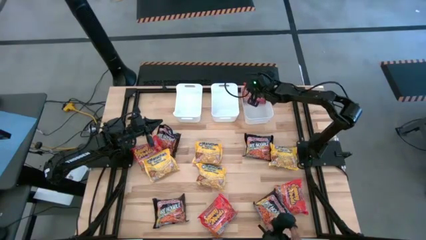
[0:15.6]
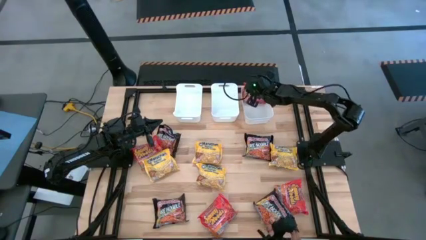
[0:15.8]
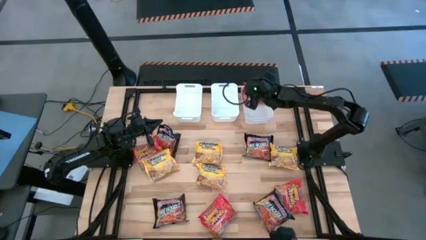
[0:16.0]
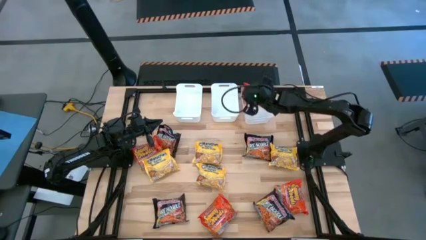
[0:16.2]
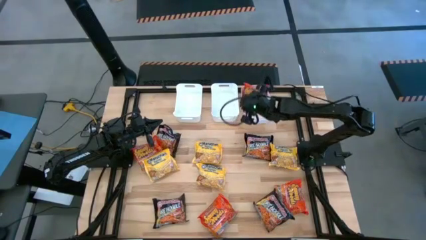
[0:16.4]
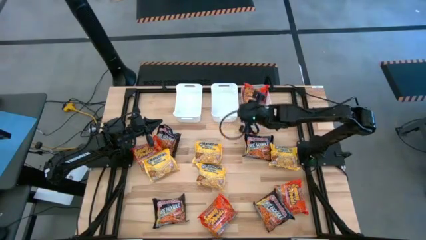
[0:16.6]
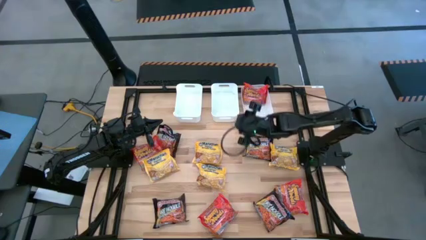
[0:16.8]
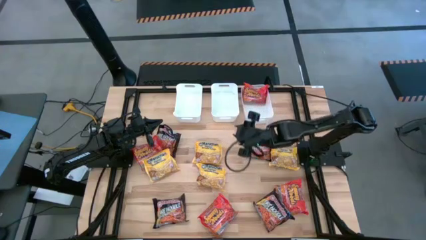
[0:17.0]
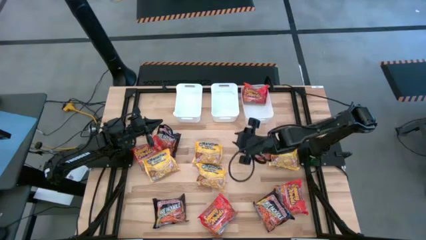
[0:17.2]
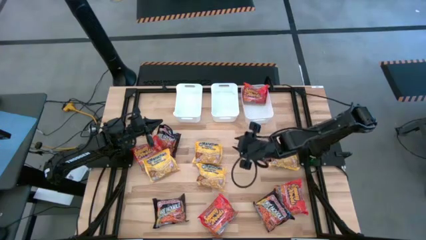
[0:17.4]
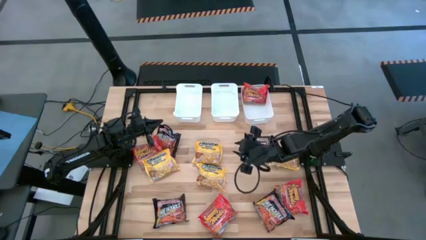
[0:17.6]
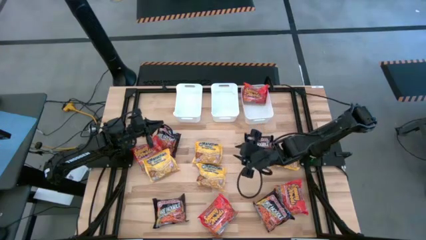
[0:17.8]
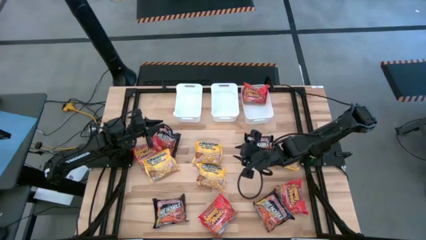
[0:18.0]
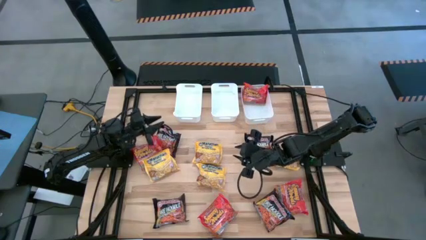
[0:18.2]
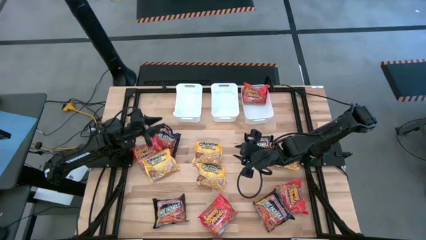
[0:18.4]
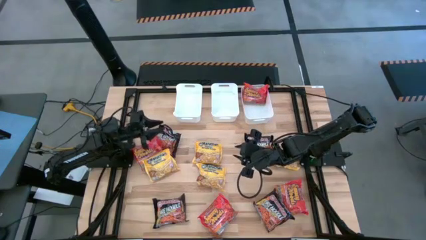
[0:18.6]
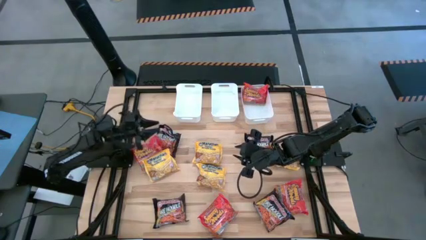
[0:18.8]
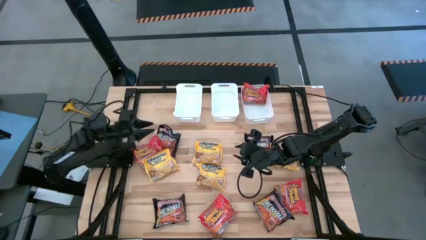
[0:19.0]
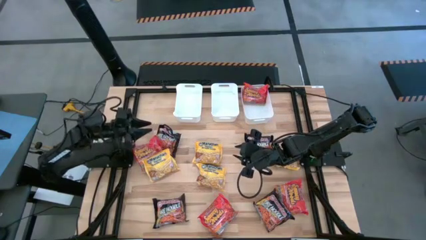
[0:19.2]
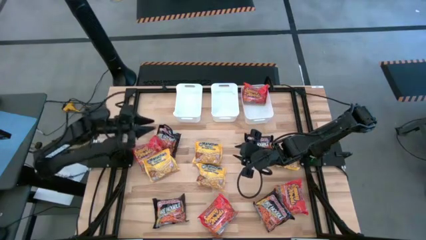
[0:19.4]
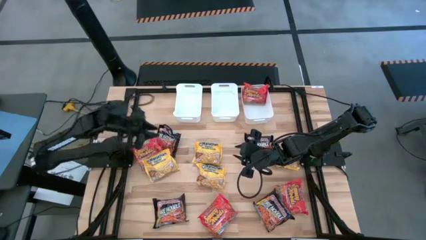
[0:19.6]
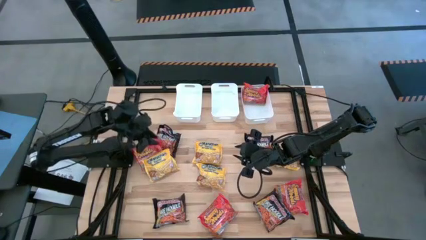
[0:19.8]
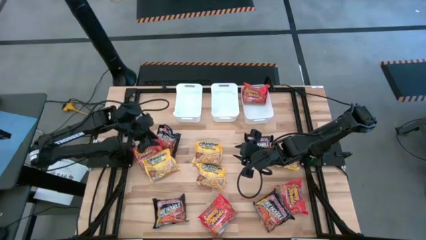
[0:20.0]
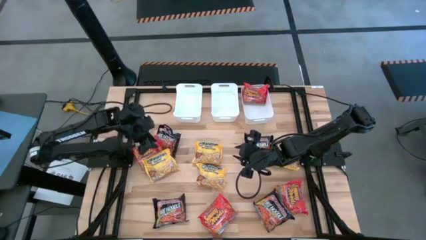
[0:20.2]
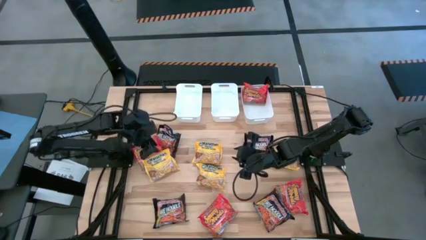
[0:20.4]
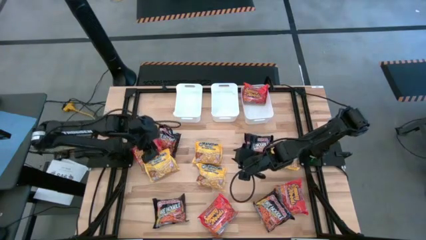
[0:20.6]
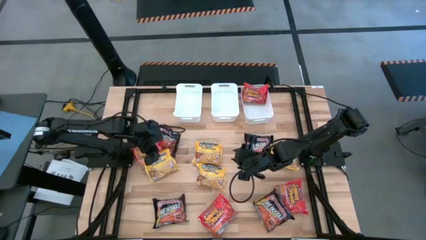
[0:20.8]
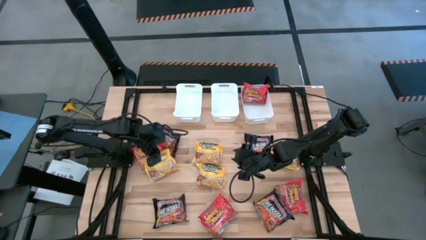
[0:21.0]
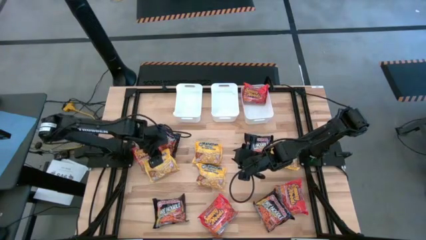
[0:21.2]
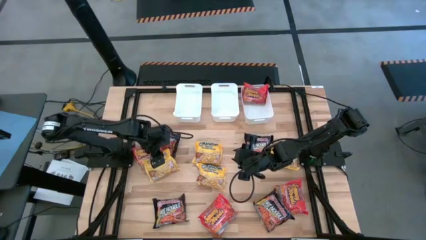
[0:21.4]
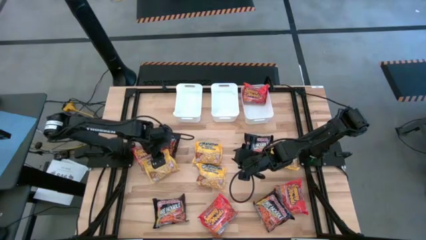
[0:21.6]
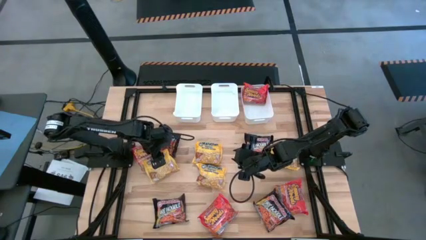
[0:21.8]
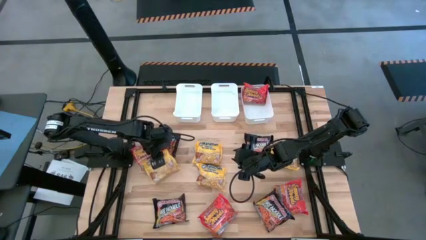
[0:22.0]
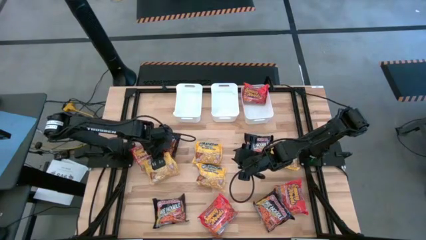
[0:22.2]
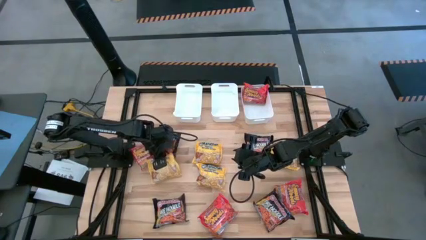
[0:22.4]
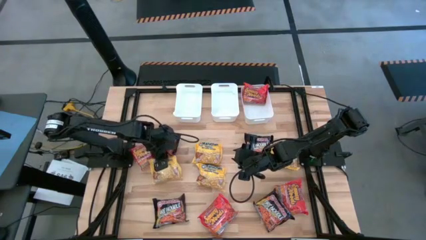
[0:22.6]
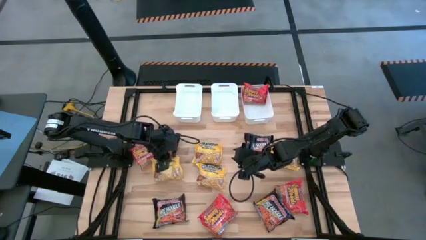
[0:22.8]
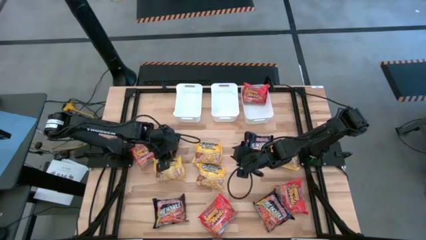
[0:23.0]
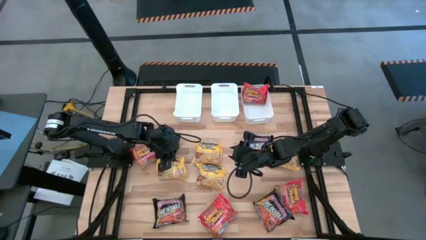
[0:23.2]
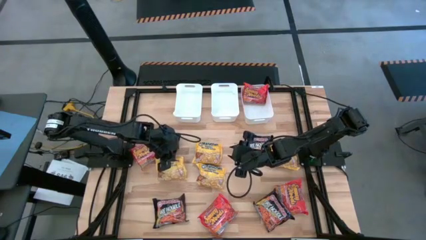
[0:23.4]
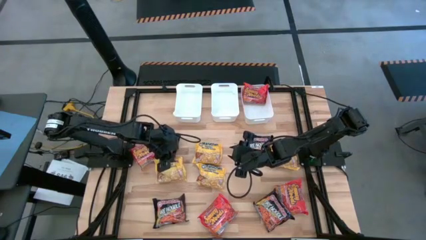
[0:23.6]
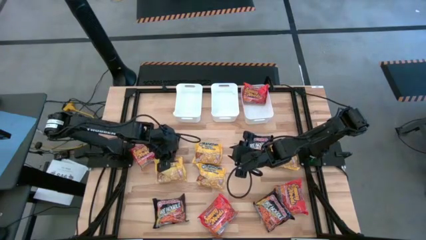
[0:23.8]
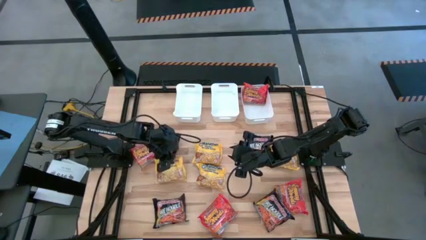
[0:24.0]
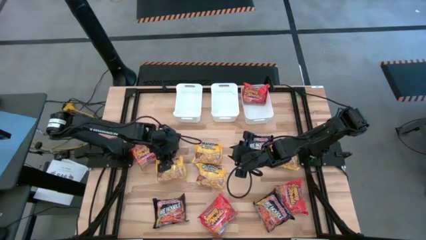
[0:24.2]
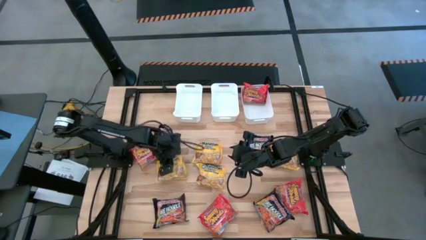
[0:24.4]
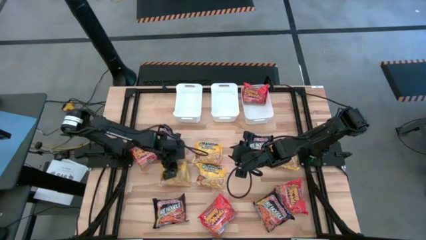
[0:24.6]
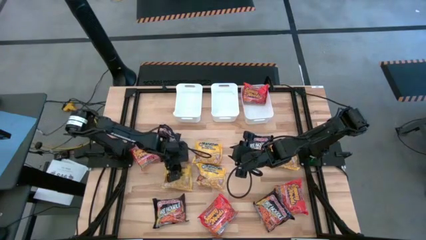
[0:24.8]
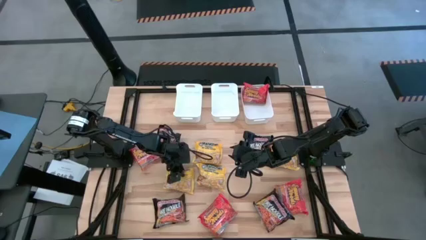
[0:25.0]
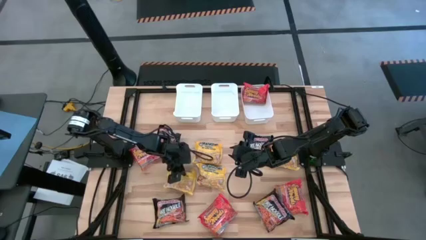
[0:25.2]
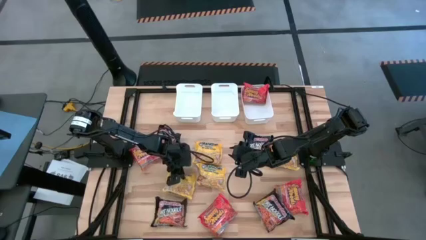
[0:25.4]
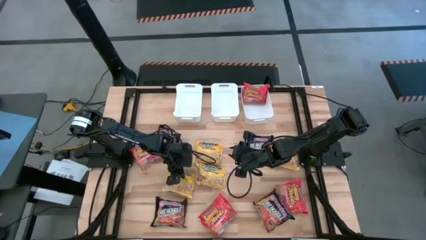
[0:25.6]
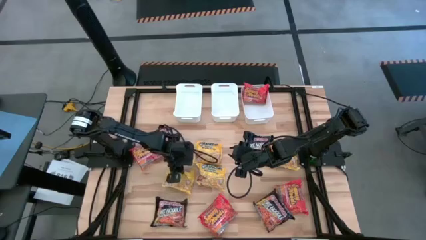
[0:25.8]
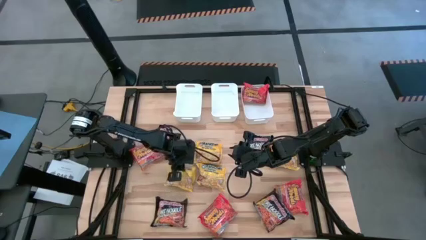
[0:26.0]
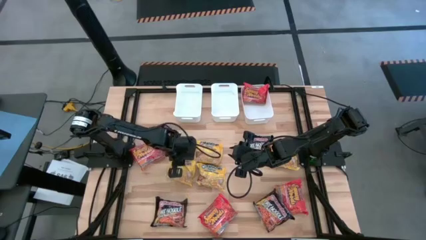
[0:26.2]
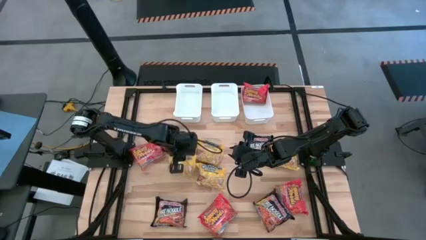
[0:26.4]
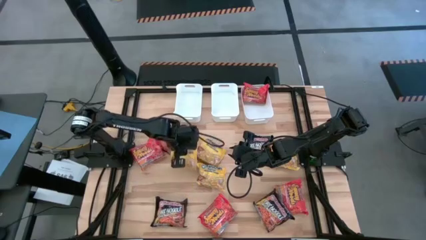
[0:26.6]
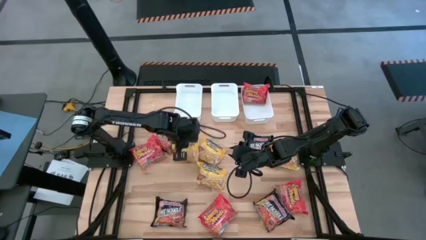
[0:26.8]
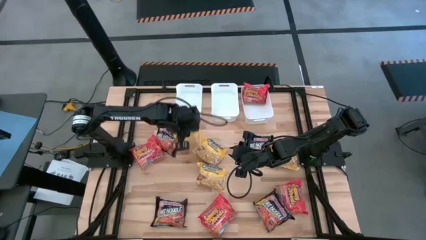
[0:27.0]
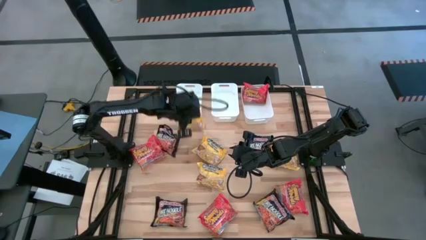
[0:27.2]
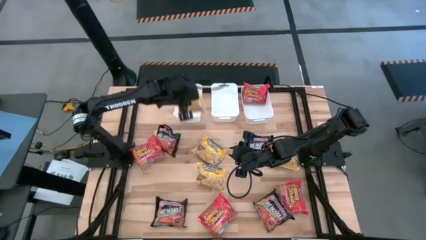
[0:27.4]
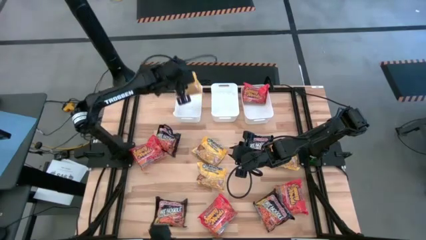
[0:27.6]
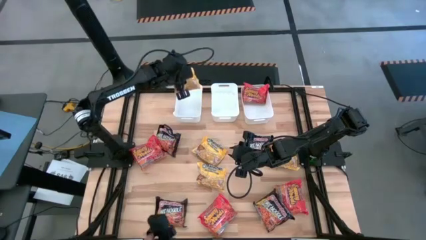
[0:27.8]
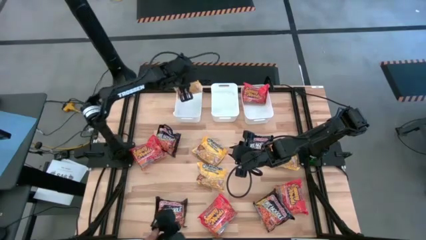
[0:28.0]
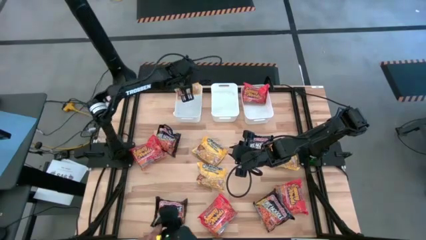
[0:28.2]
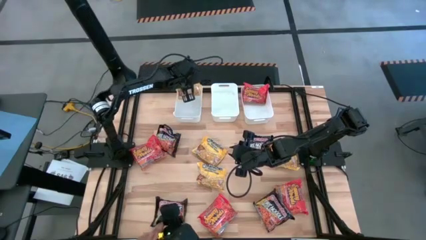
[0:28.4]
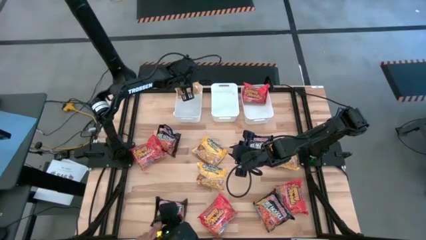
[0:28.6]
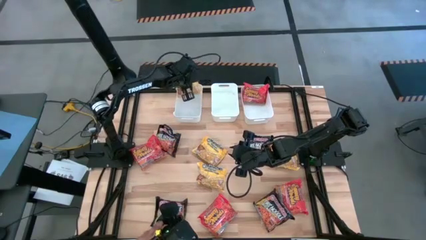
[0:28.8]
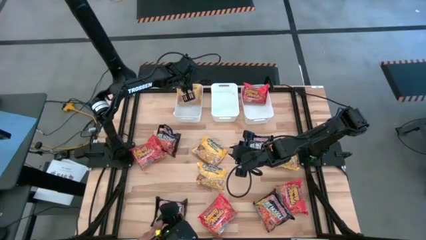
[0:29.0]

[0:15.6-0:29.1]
Task: Sort Maruchan noodles
Put the yellow noodle pack into the left white bin

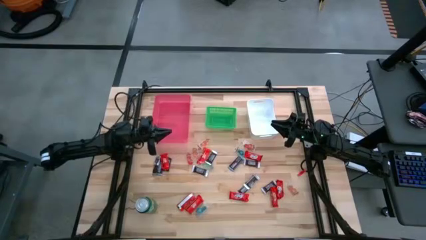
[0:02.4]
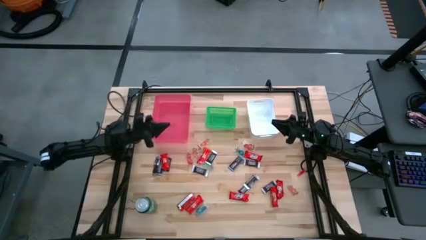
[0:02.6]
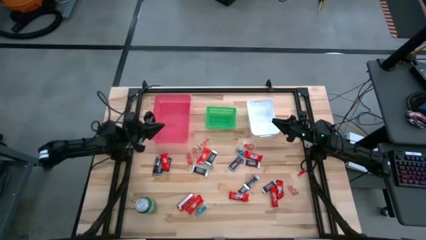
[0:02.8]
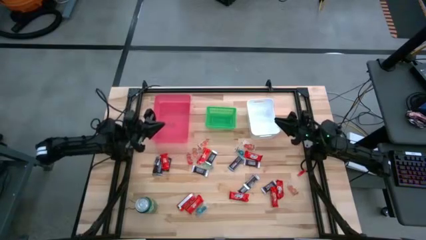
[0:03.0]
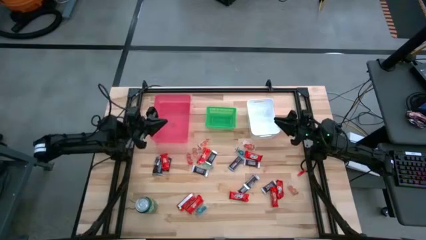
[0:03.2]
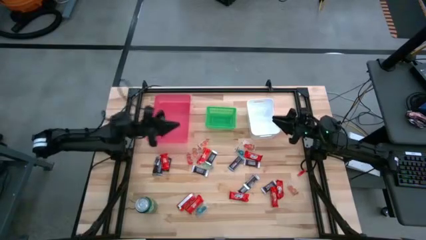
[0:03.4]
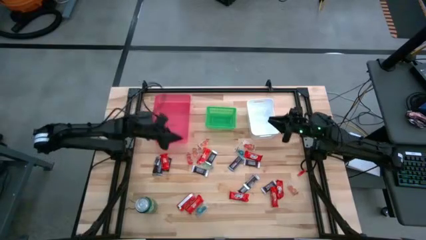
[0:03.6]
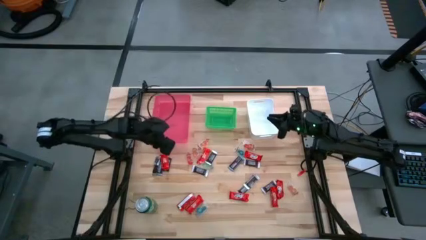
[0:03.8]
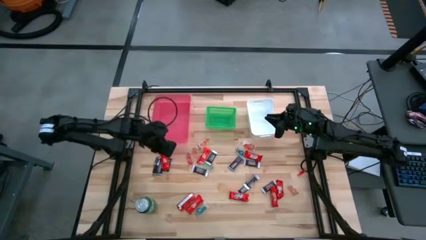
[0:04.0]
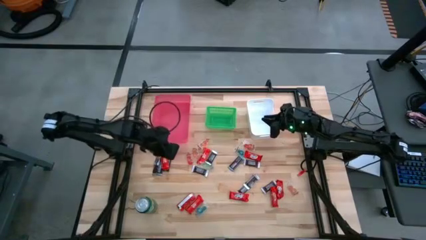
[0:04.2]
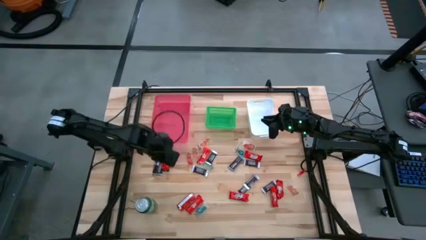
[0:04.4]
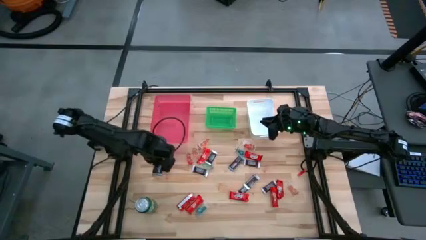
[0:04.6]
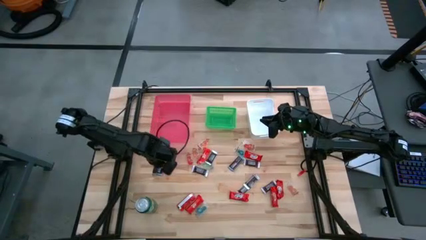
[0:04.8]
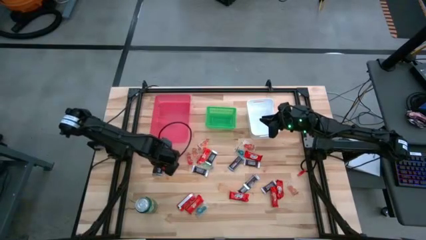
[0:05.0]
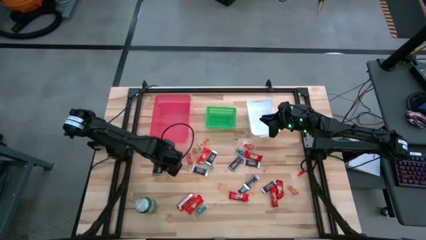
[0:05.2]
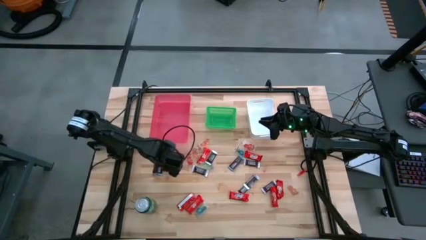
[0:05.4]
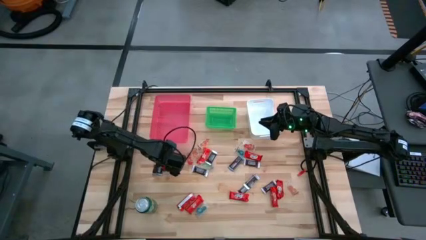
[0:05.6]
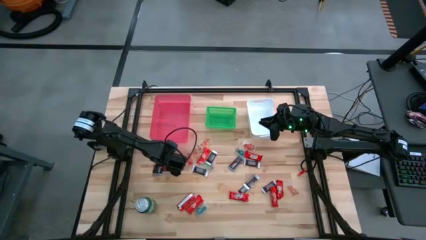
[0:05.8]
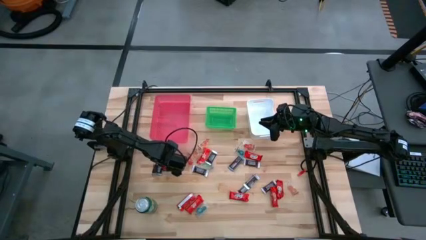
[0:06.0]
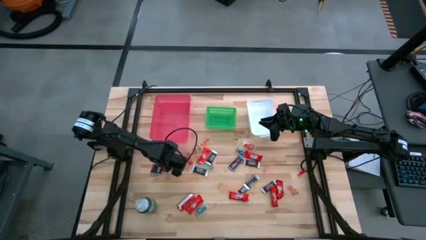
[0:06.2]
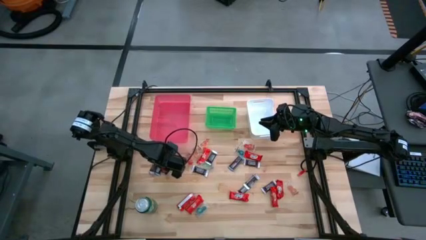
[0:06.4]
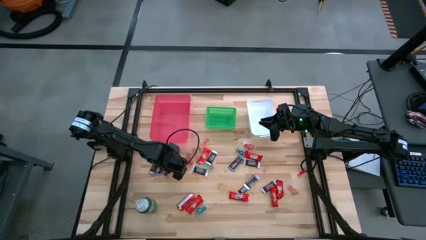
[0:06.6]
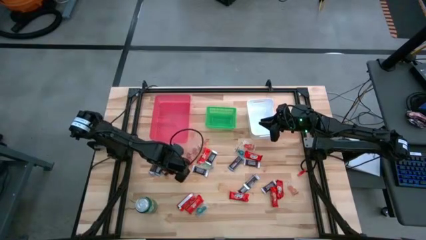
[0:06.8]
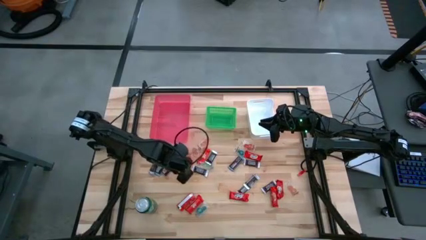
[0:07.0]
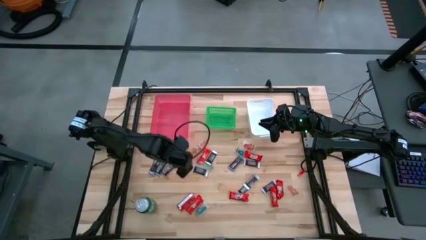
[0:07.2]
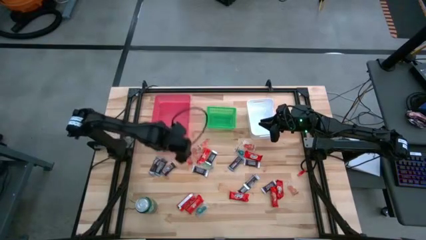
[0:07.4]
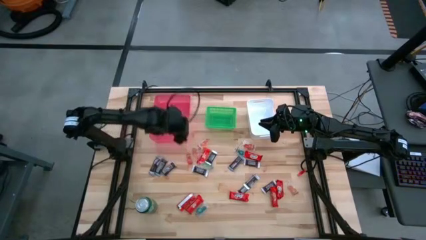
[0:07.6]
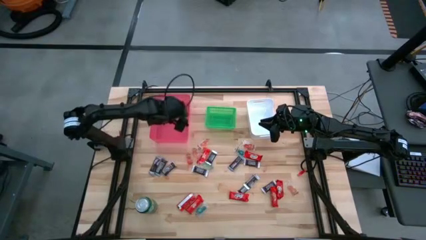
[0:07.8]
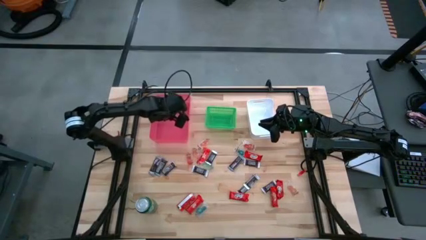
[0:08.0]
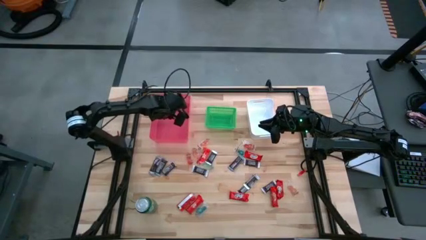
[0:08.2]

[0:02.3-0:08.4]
Task: Sort candy
Put the red chocolate bar into the pink bin
